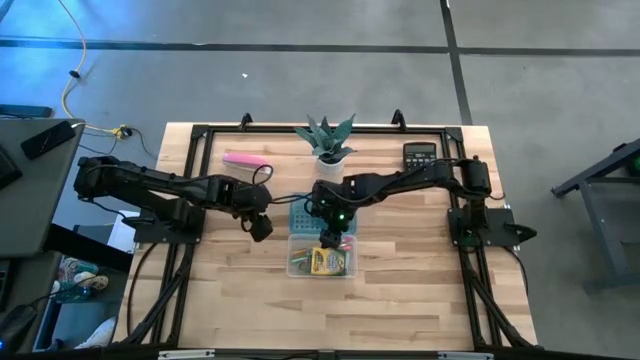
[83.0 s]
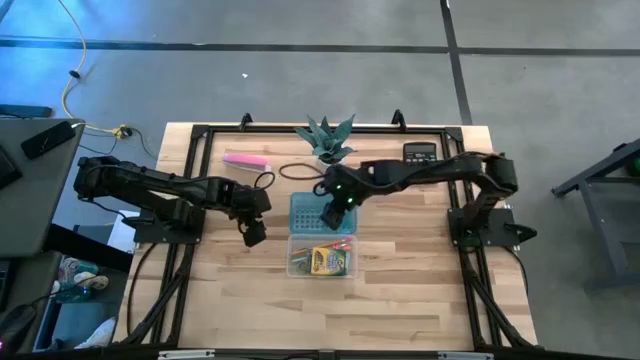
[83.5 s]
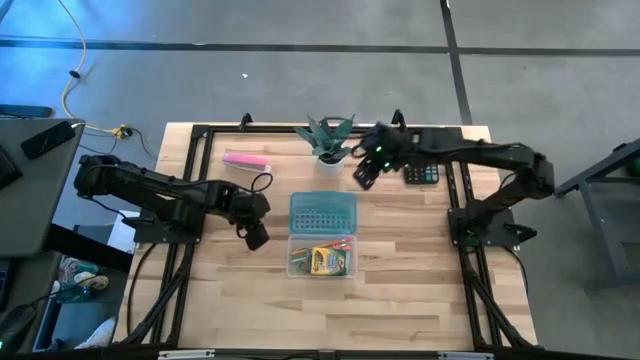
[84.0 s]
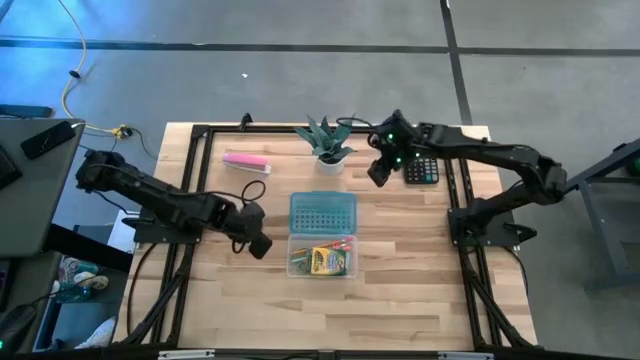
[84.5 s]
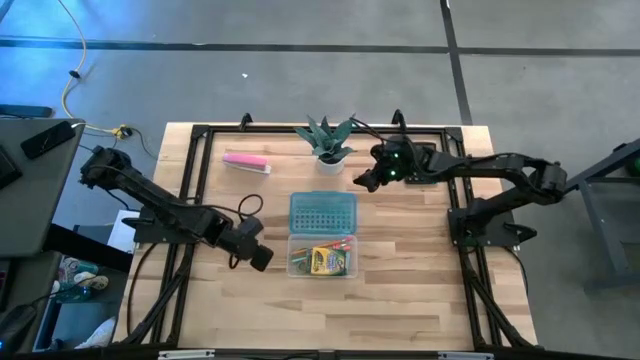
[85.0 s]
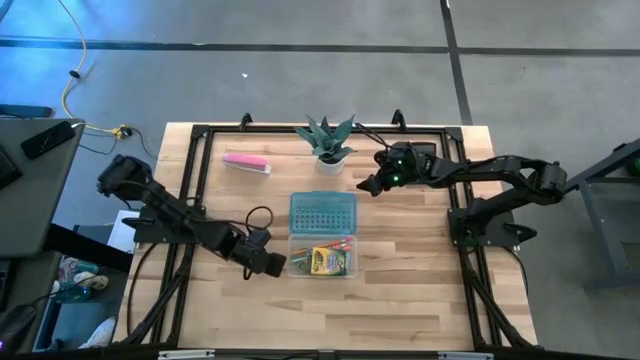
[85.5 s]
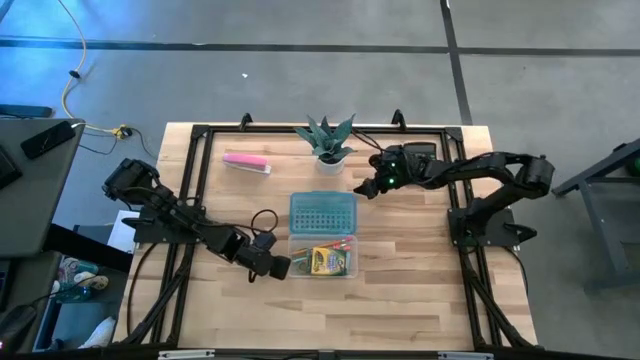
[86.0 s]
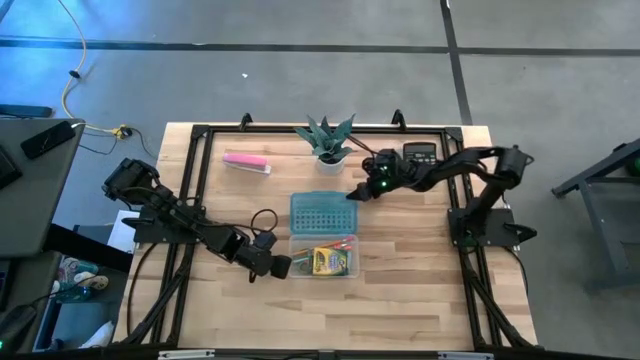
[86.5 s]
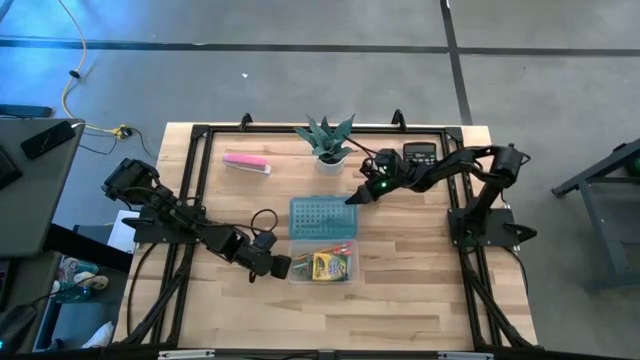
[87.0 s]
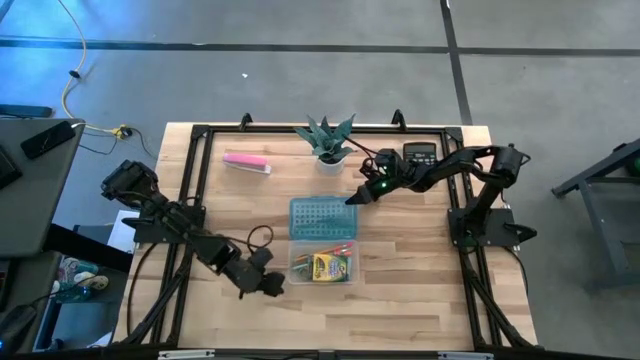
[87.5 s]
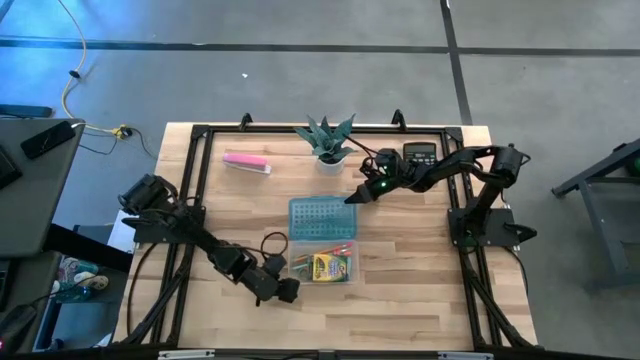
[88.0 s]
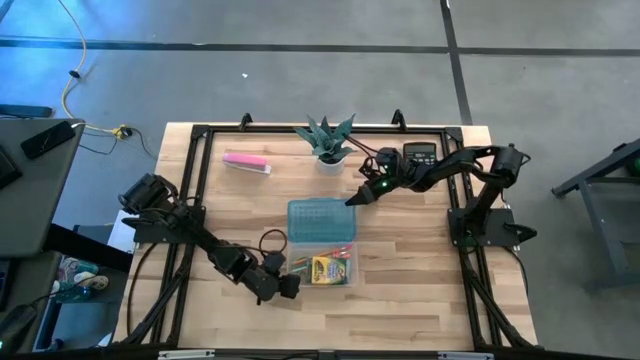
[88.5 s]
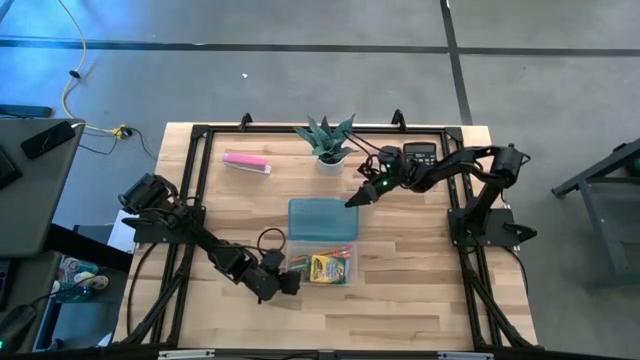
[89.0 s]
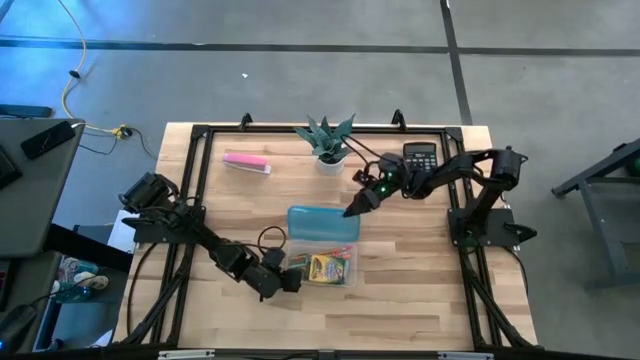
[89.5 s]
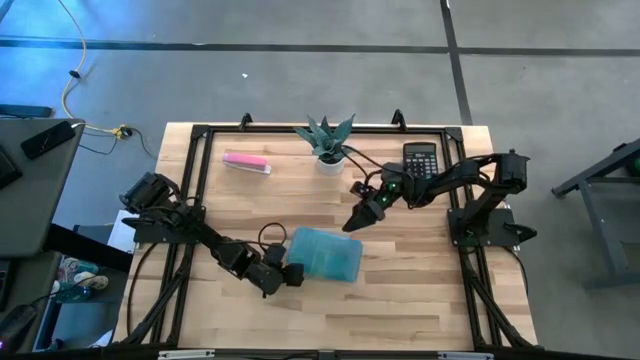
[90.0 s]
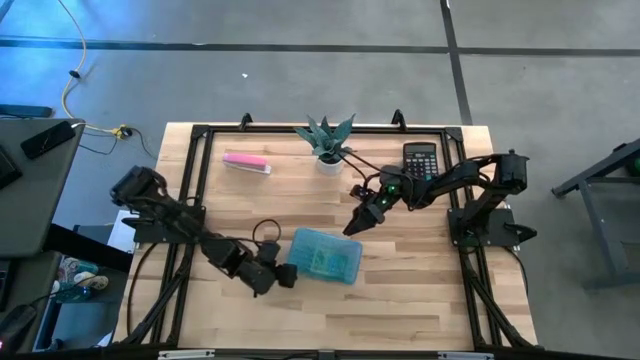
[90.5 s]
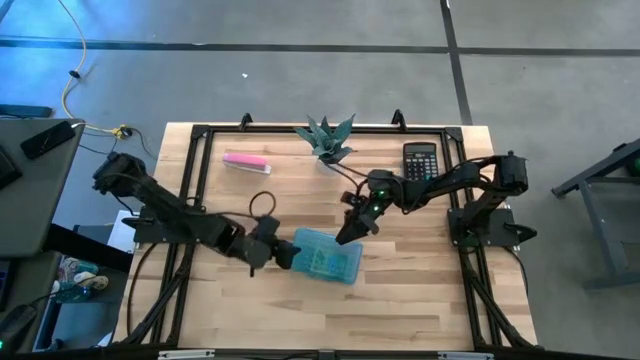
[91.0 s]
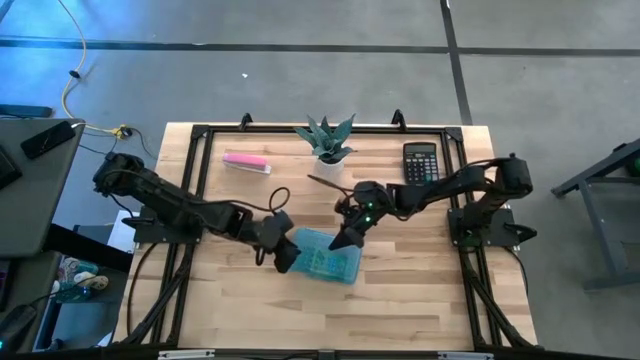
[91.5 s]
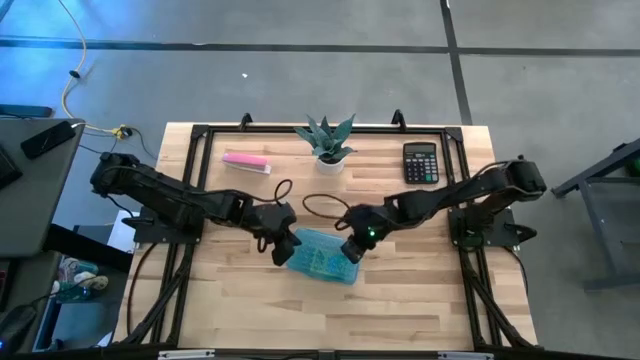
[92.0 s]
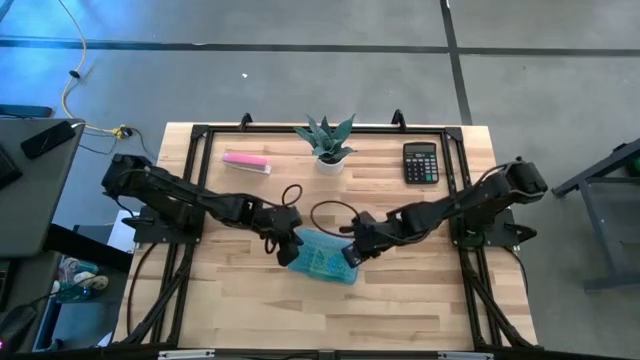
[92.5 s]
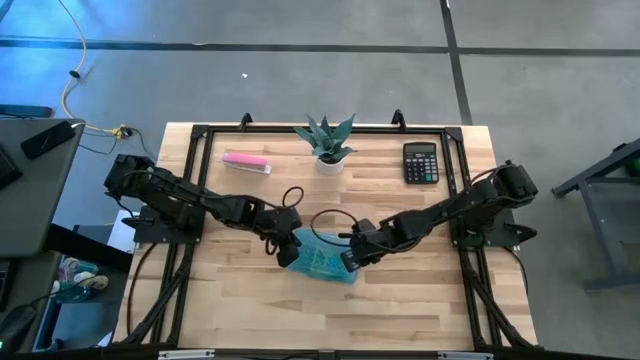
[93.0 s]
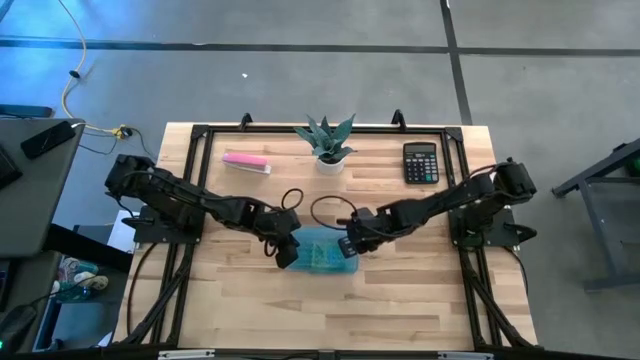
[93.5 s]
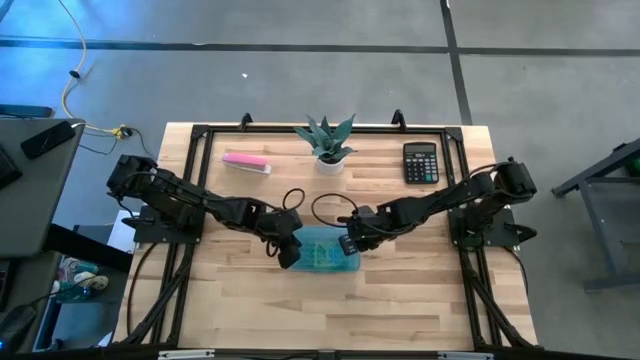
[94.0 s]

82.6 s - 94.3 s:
Task: Pack school essentials
Close the blue supply box

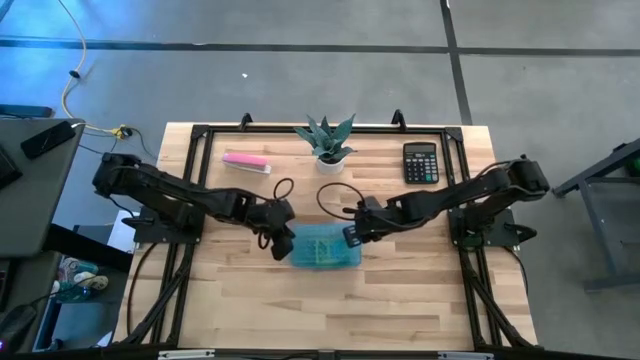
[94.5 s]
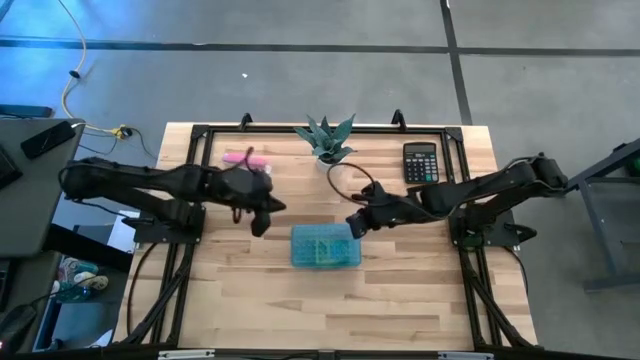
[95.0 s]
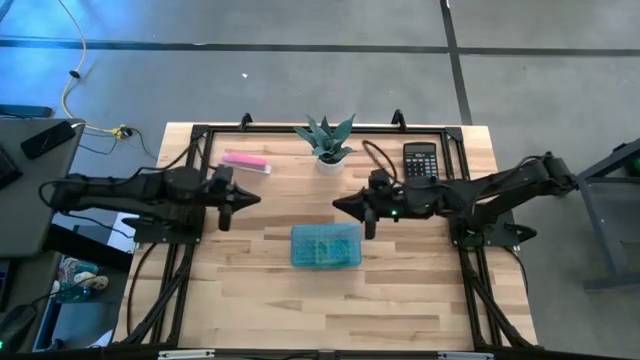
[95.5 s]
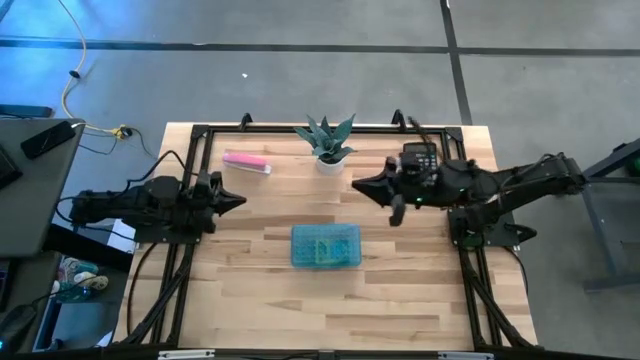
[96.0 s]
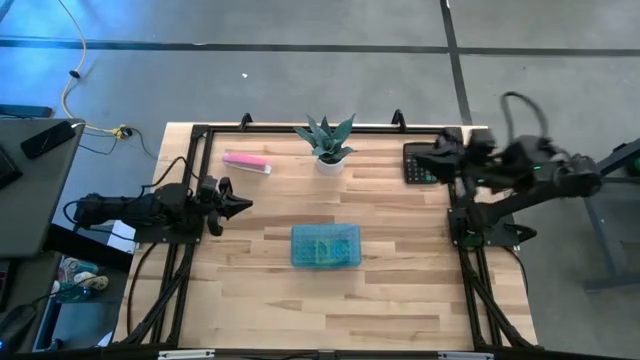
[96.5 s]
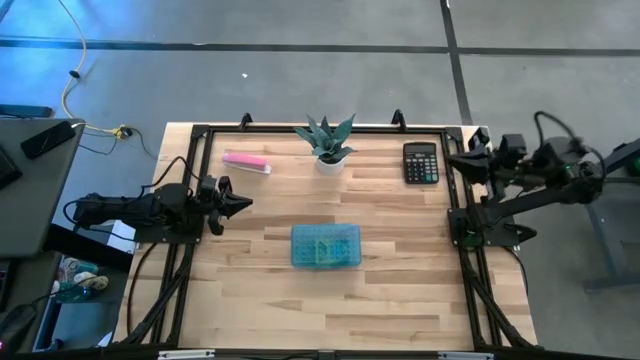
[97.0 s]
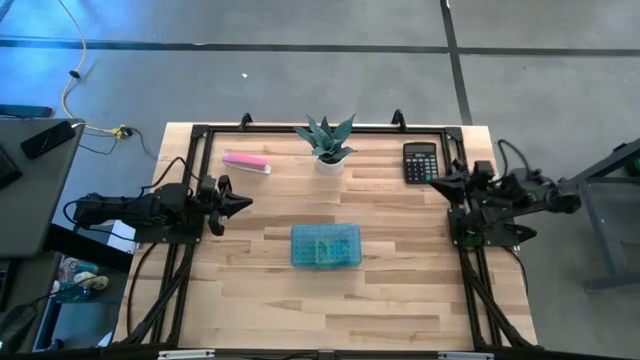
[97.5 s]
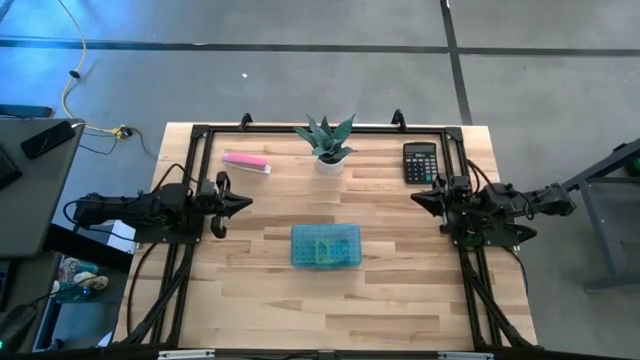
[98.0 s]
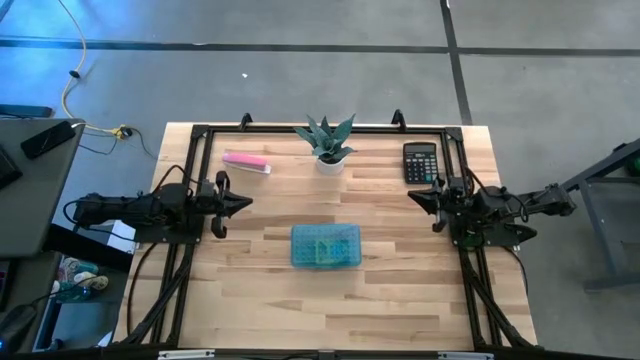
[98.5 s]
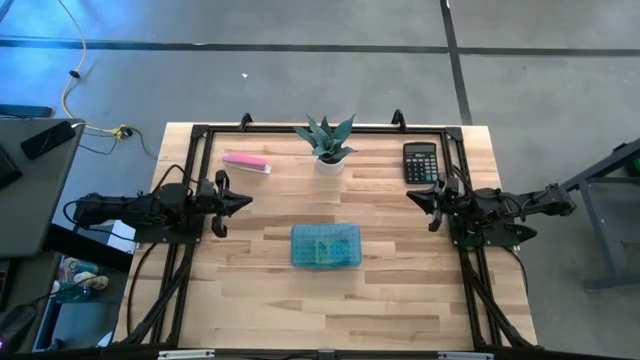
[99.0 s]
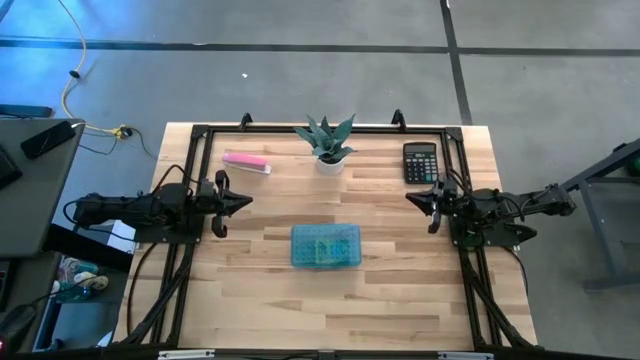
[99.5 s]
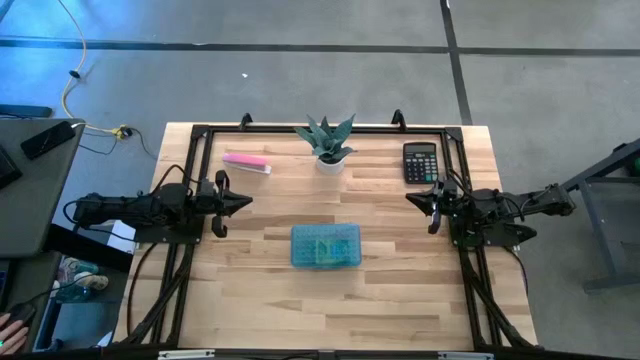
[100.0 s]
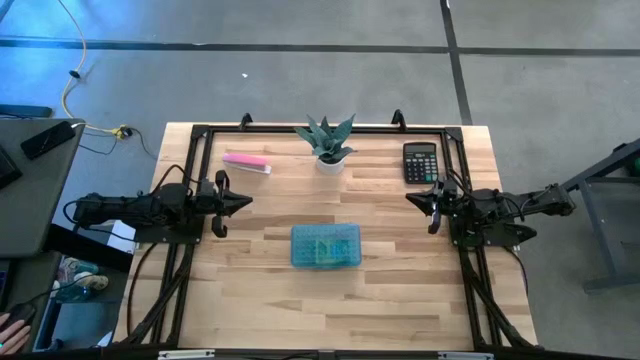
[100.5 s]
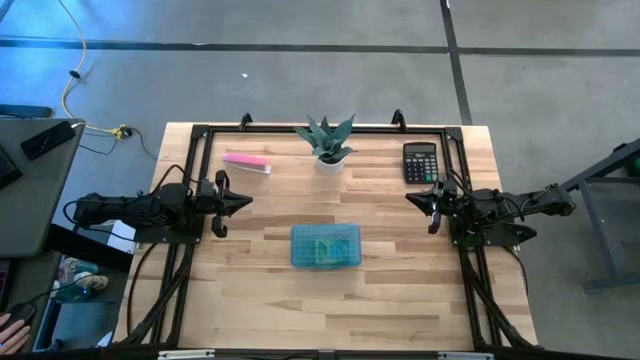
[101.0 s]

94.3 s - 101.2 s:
Return to Home Position
